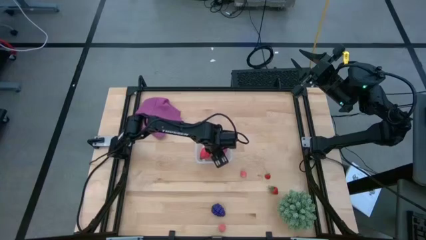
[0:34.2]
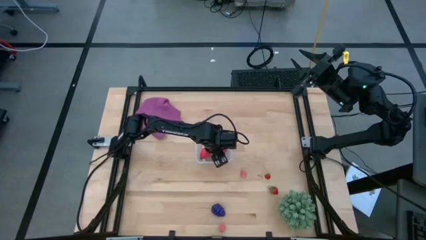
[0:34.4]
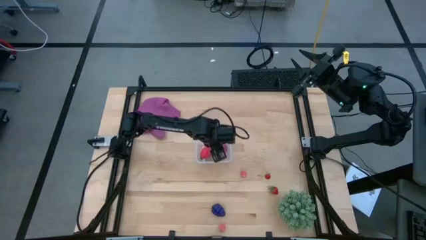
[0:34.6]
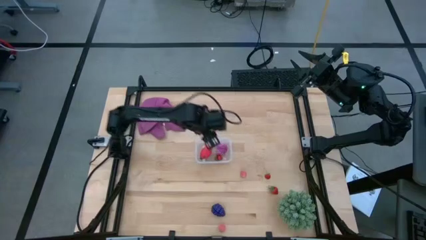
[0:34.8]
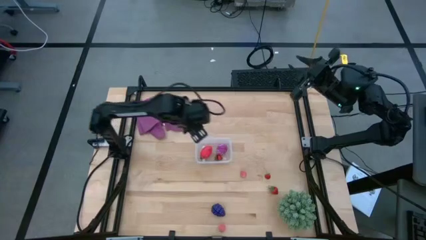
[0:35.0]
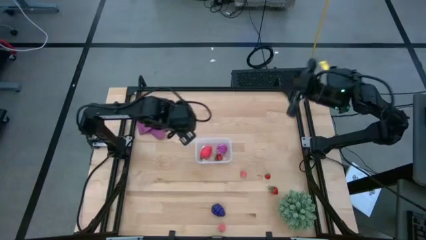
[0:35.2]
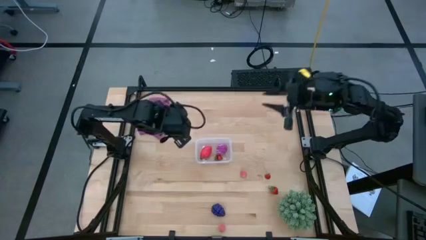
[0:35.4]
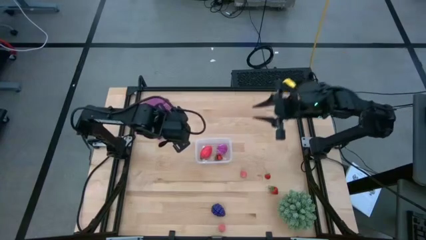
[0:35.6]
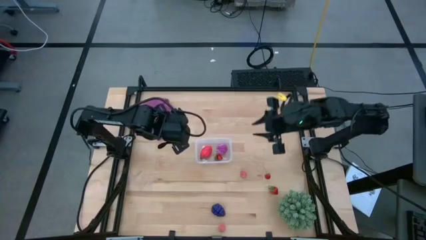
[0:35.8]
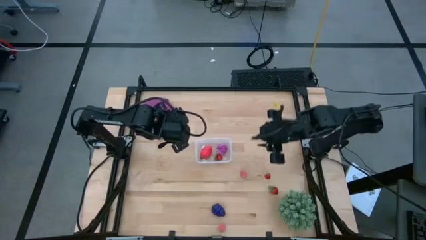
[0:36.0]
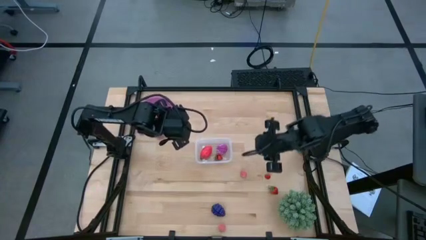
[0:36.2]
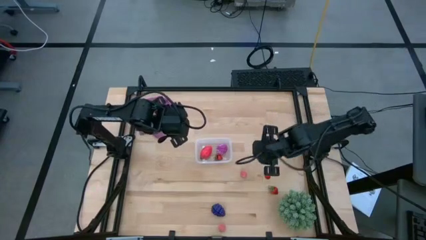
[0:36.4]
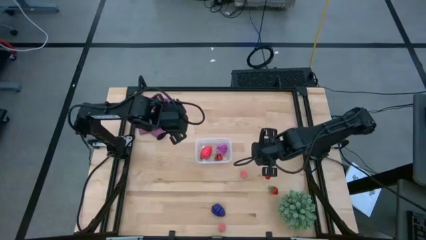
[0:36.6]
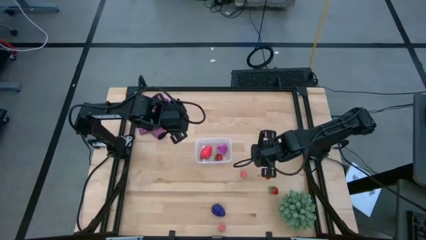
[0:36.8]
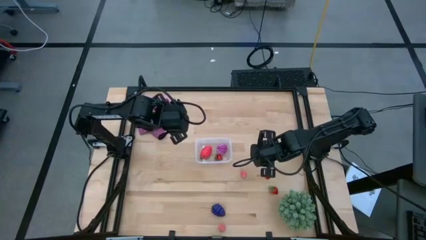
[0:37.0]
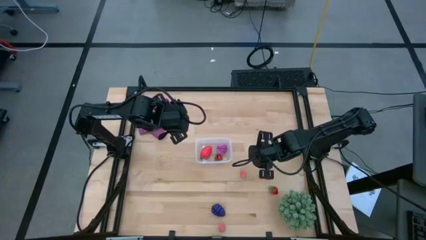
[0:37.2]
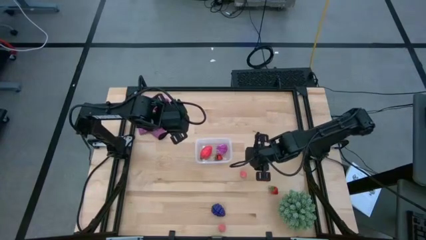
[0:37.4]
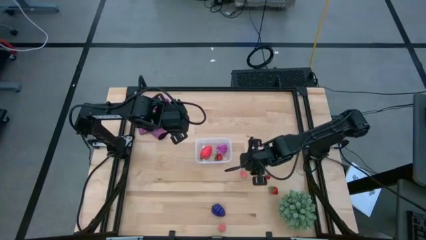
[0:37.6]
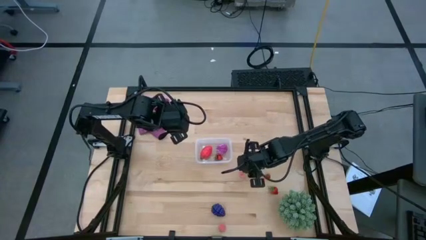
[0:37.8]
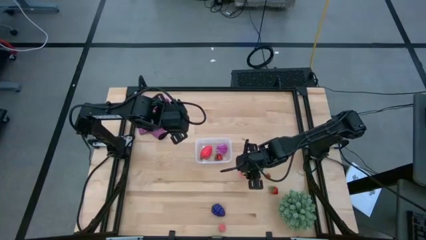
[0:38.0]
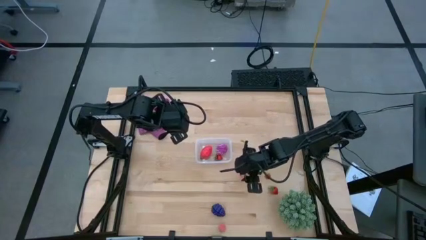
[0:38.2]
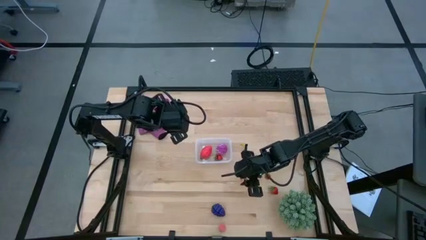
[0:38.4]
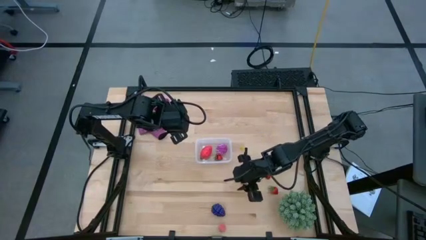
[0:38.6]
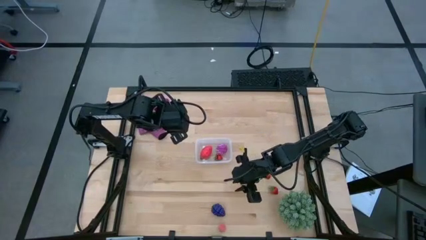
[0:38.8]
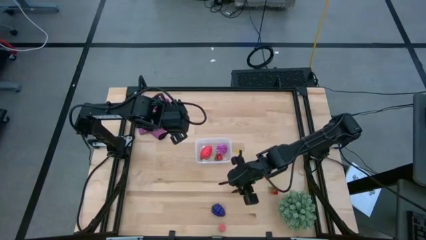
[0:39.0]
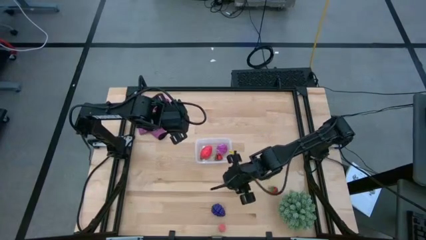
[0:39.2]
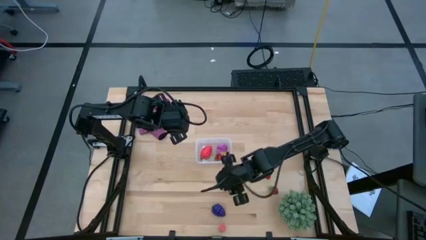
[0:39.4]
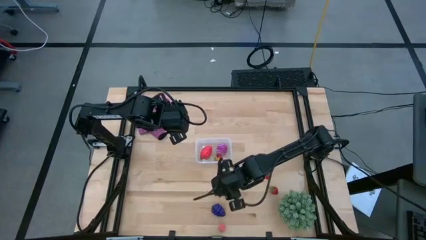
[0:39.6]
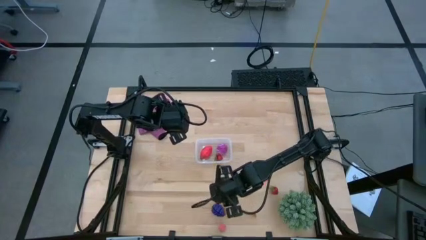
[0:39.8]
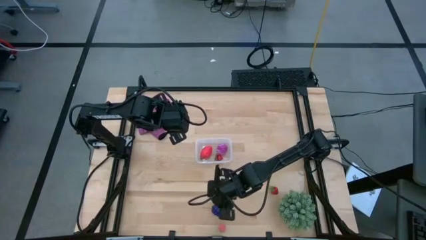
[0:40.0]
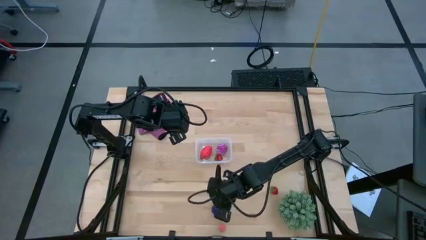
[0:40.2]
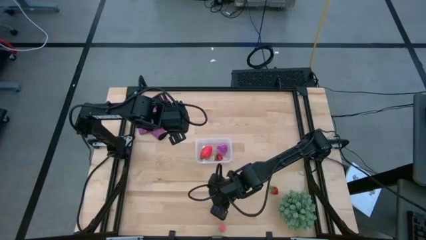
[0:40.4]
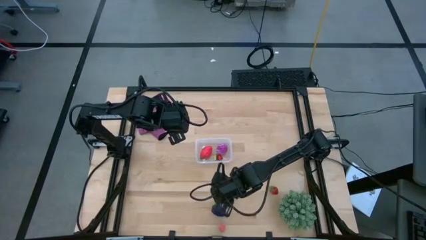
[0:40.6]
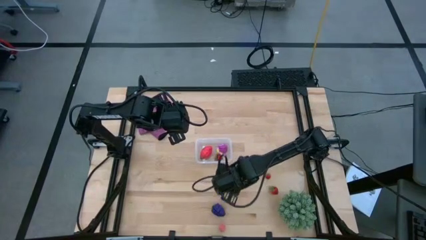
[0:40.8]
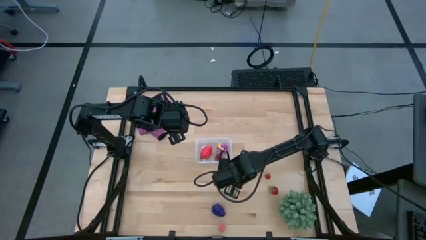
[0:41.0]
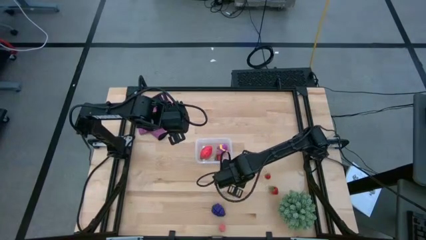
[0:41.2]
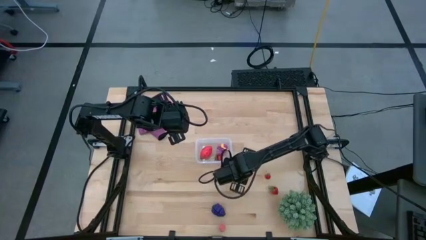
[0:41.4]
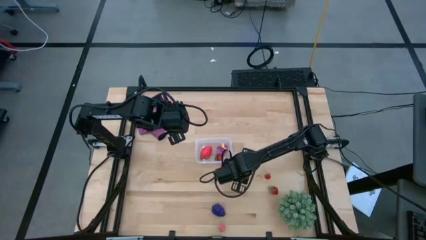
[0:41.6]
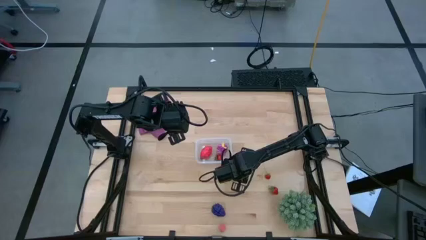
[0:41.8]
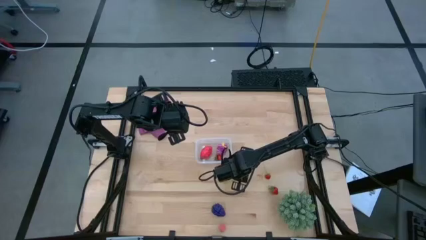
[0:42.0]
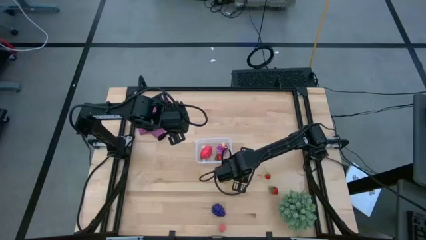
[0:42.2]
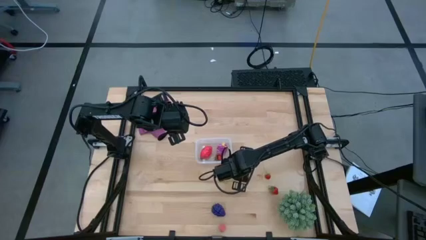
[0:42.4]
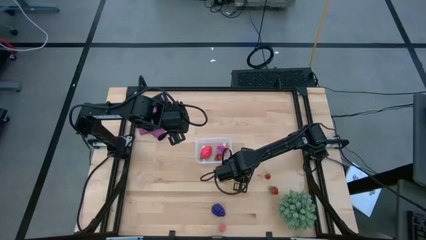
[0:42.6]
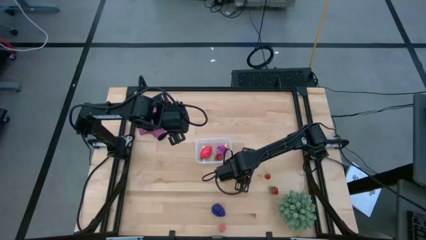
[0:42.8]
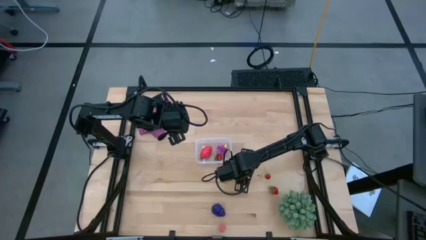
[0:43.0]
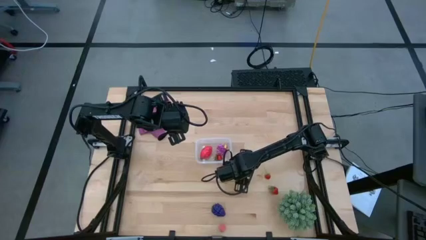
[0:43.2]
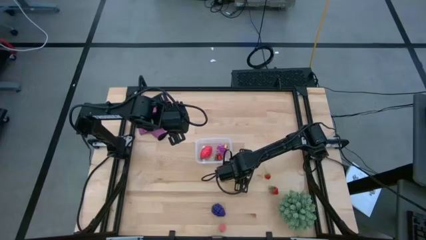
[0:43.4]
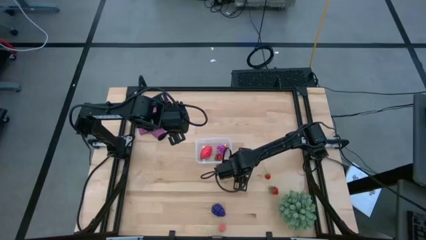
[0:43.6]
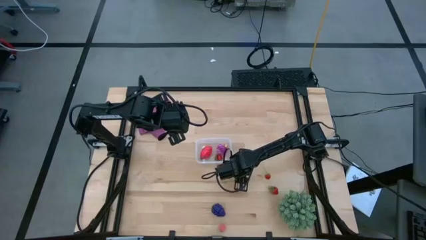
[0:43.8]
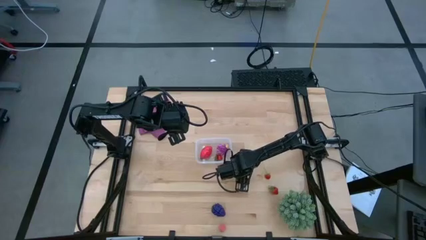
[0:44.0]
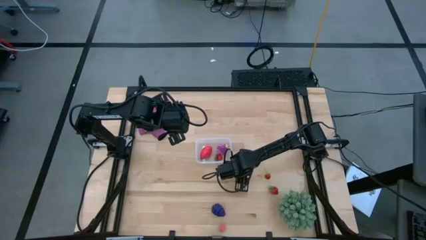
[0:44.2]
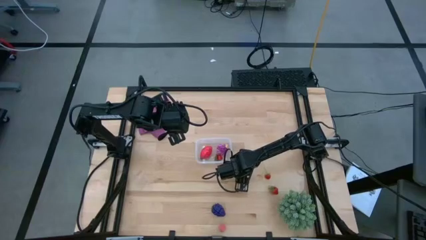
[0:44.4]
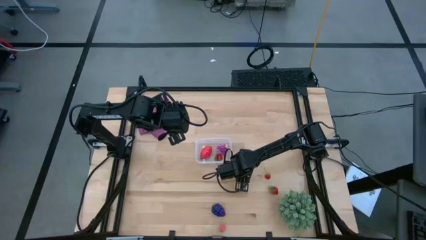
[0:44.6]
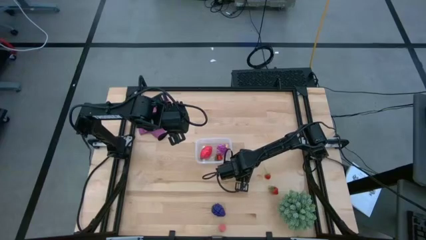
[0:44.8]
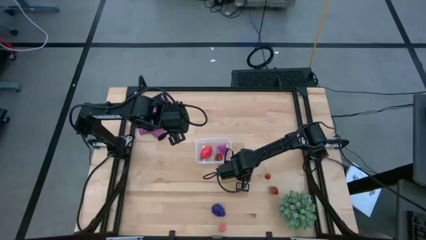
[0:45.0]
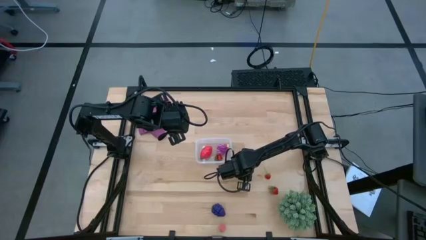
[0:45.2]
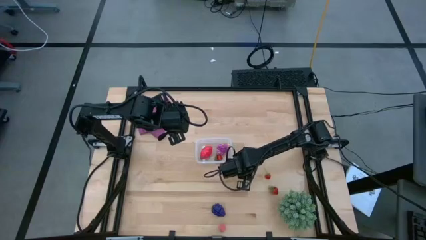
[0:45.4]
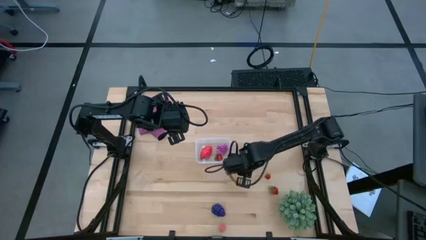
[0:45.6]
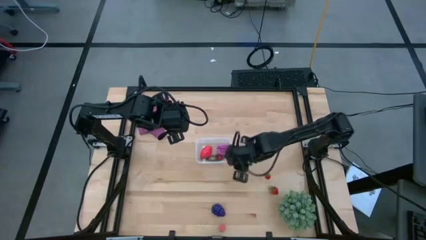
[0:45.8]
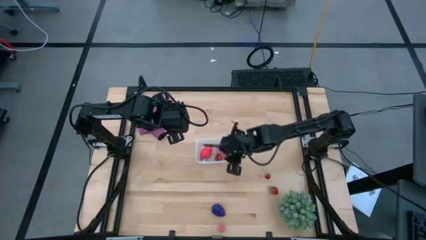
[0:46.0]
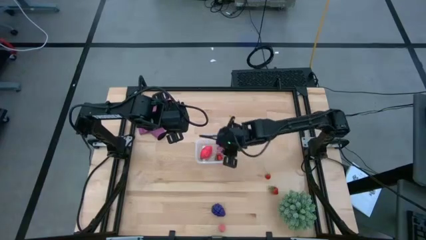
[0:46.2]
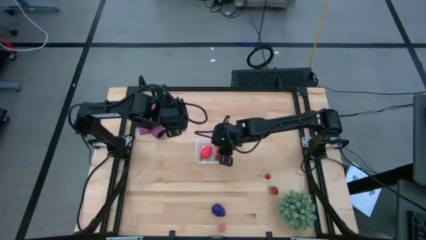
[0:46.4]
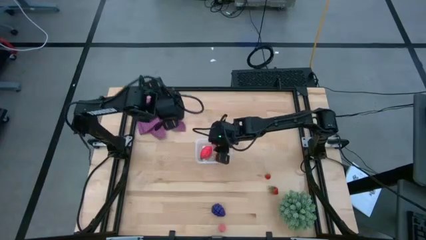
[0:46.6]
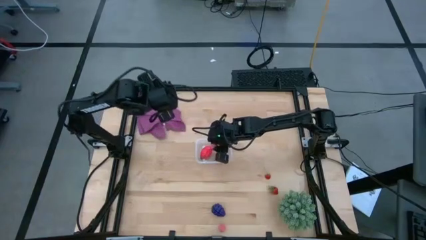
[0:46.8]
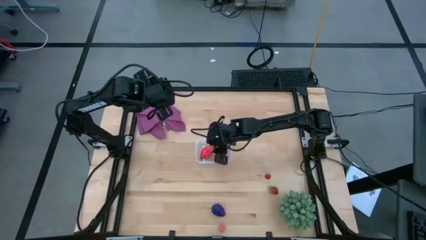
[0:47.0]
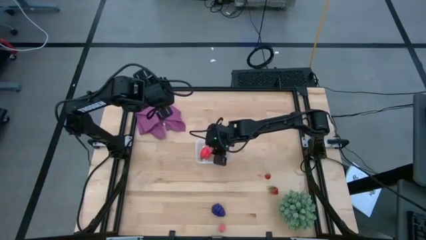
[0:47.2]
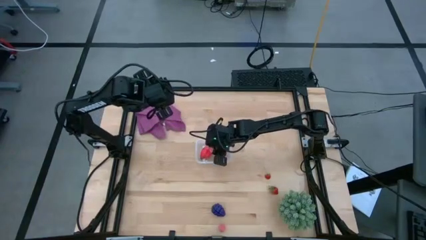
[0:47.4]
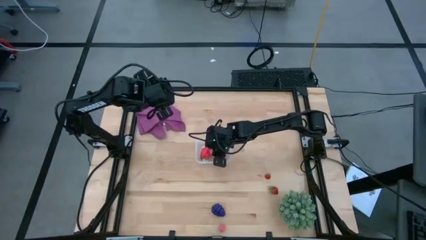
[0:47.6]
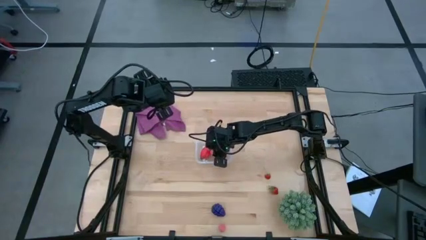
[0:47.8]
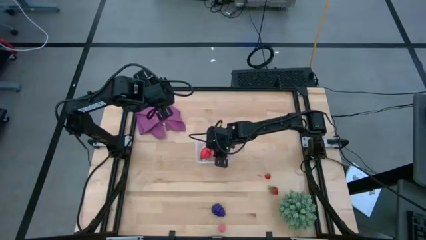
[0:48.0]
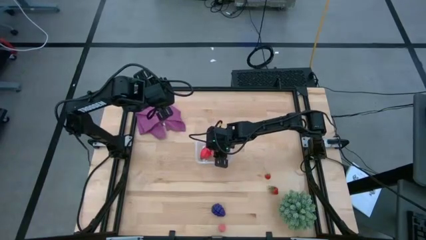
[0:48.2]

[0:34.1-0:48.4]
Task: Pick and placing Produce into tupperware
Put the top pink peach into the transparent bin
